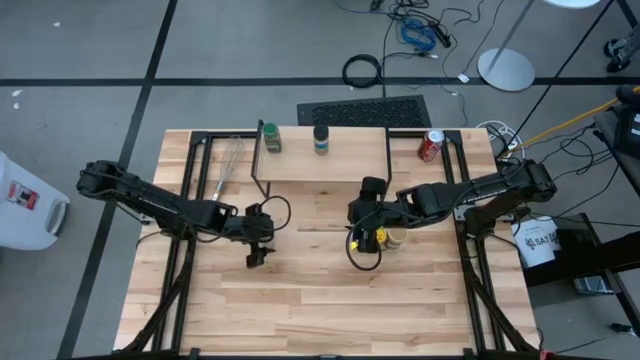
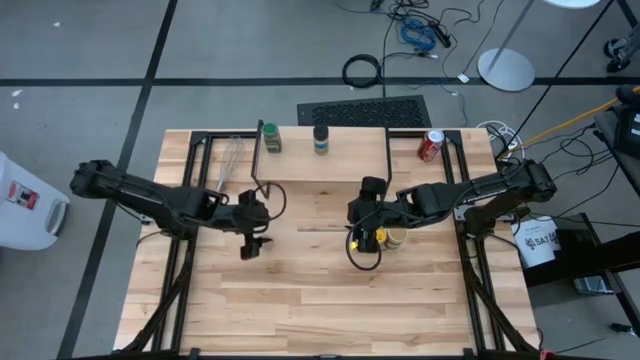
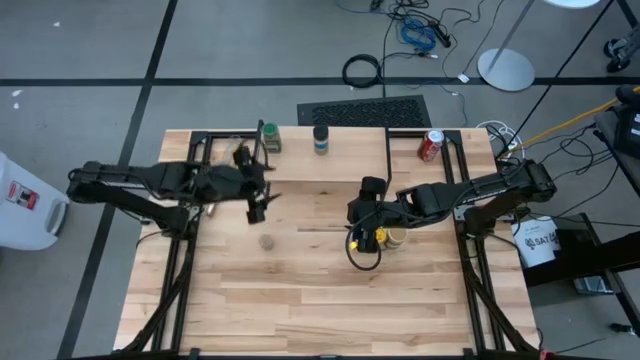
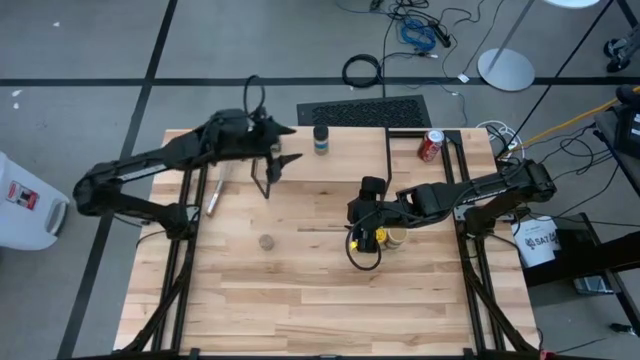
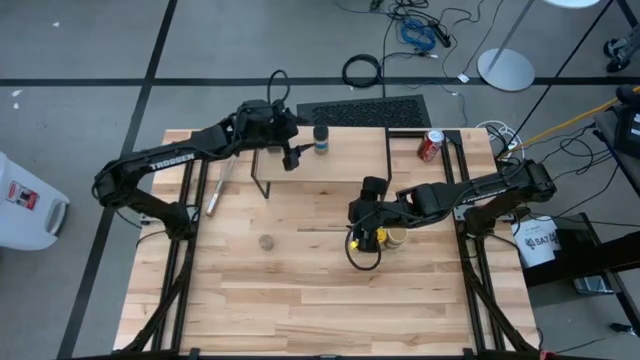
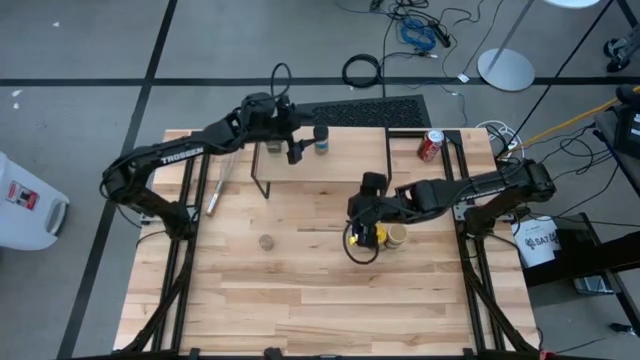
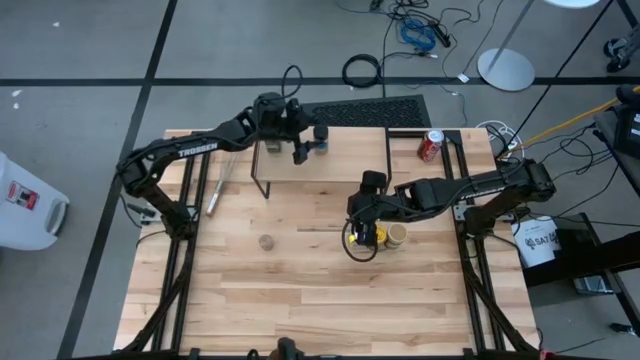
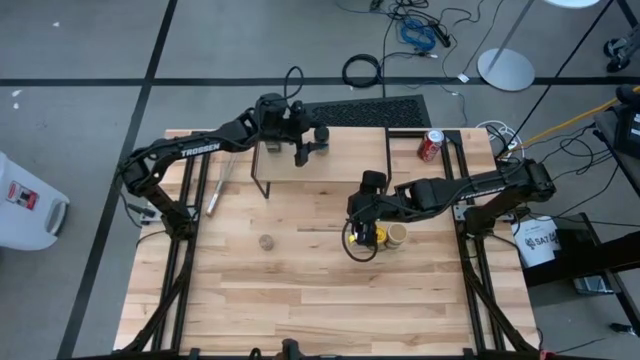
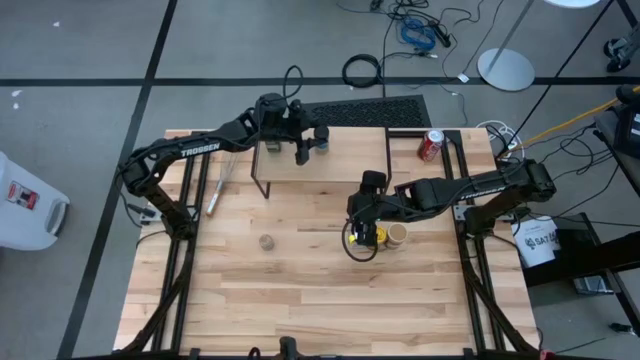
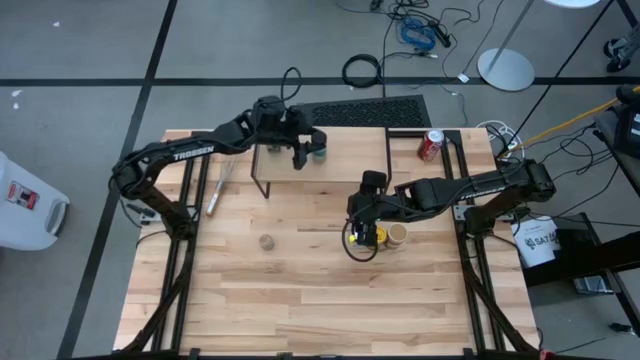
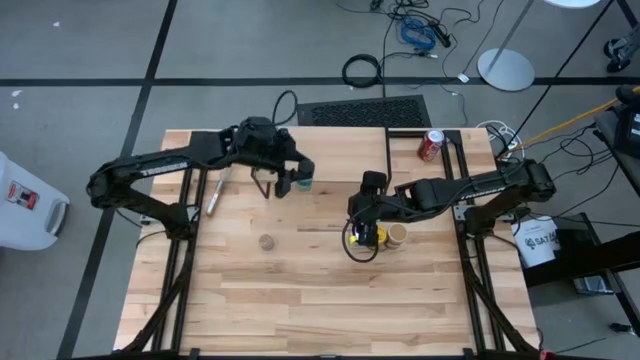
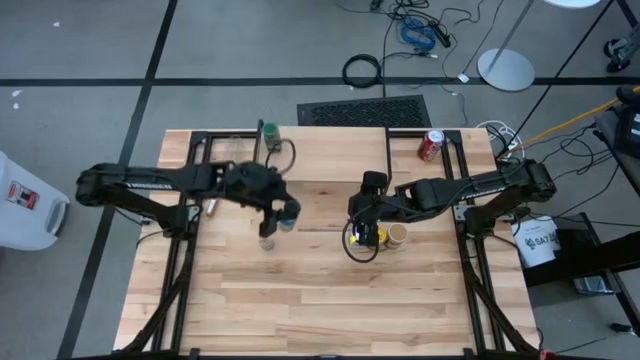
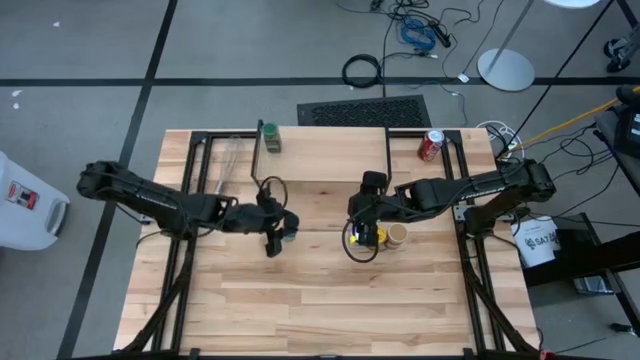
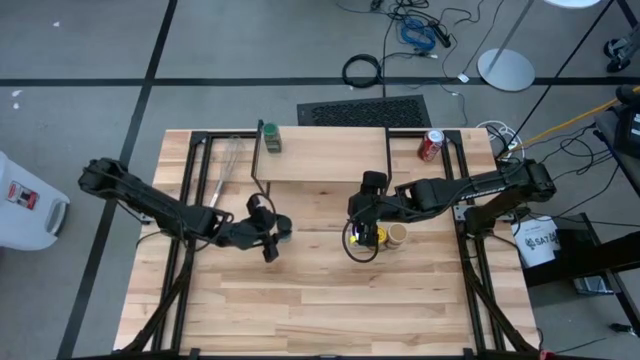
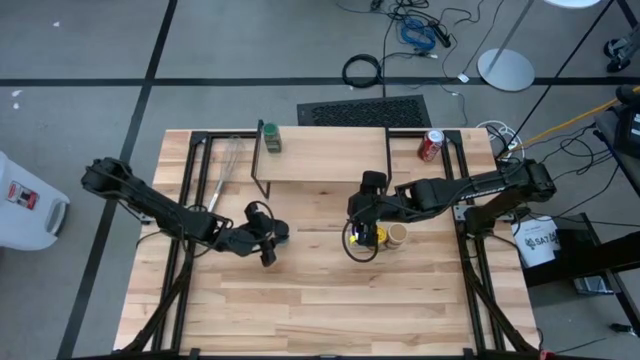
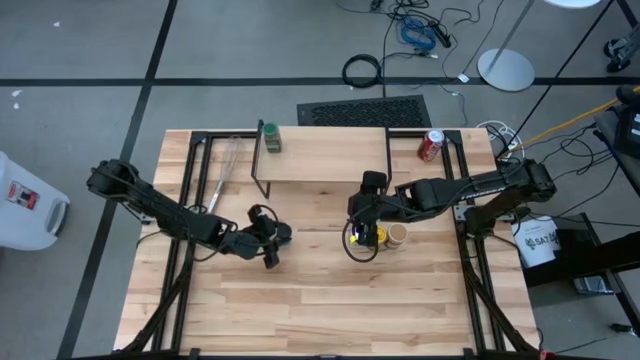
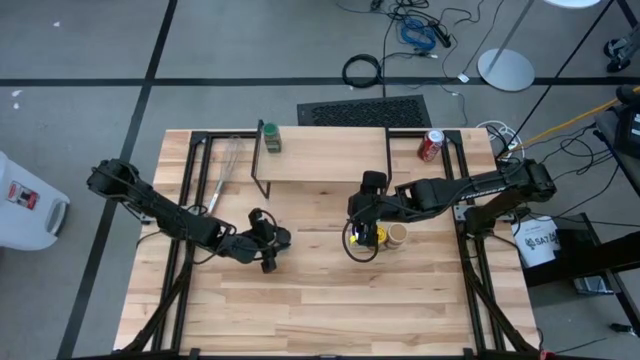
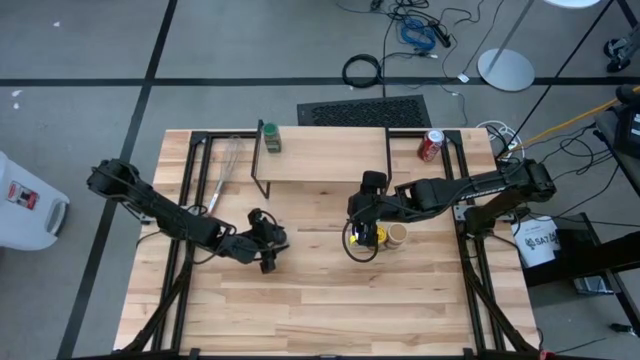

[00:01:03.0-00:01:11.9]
Task: Shelf spices
Remove the black seasoning bottle from the shelf

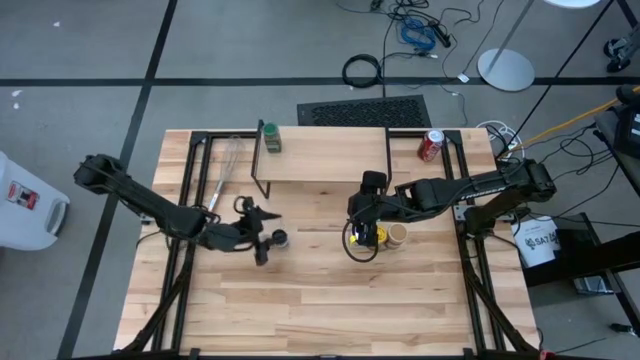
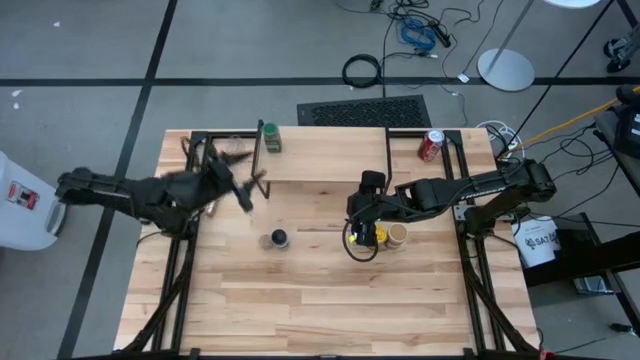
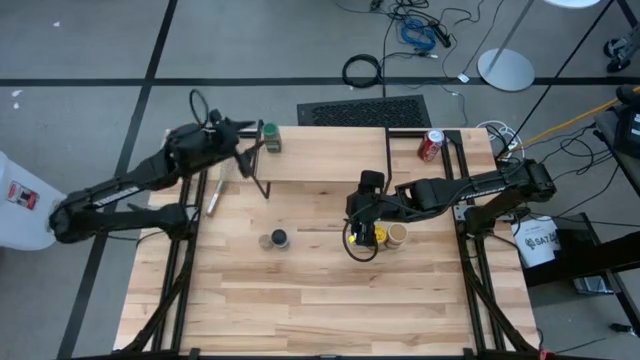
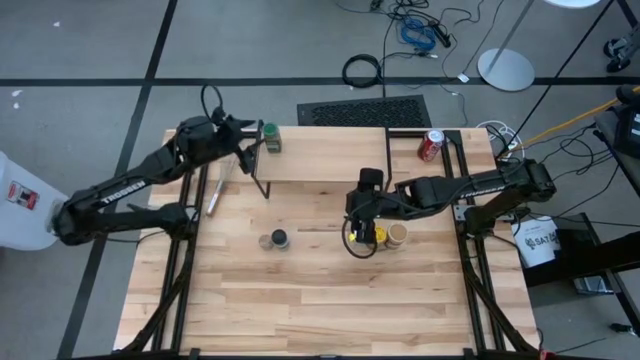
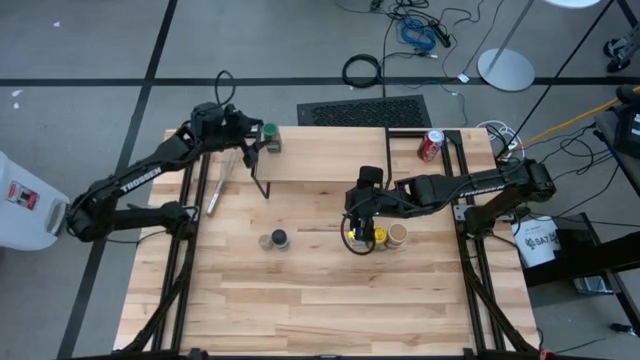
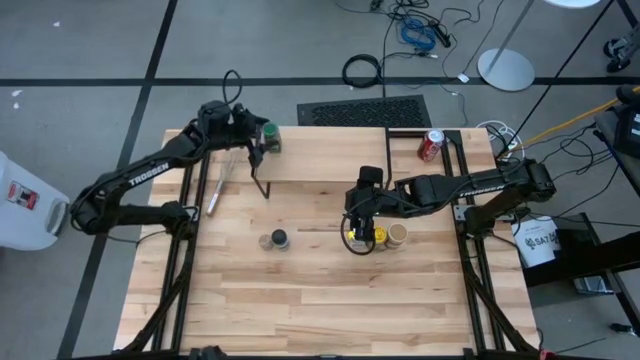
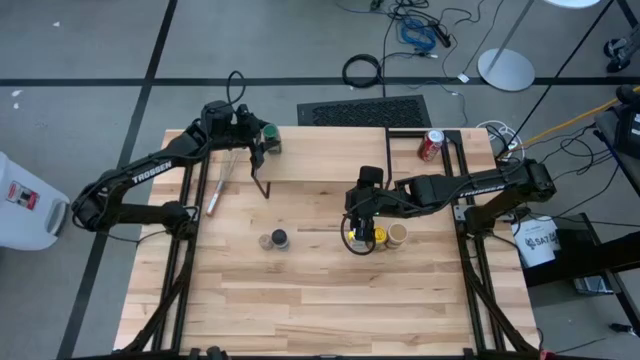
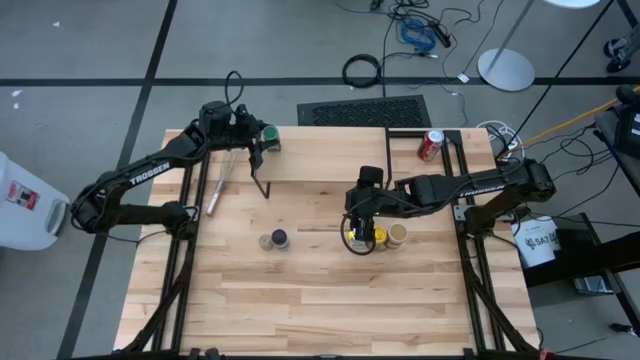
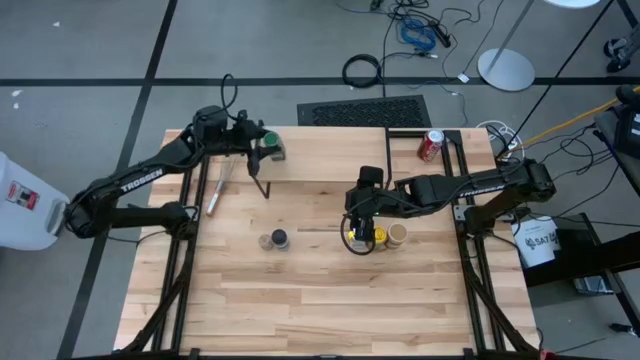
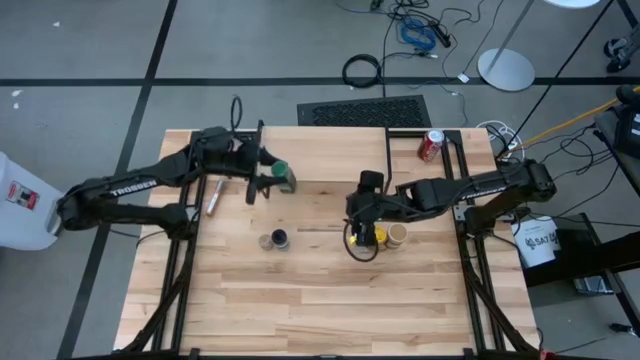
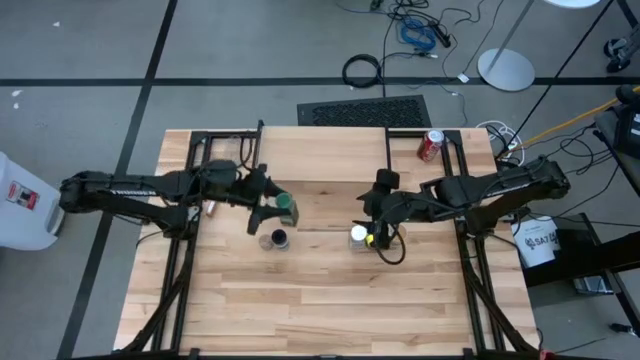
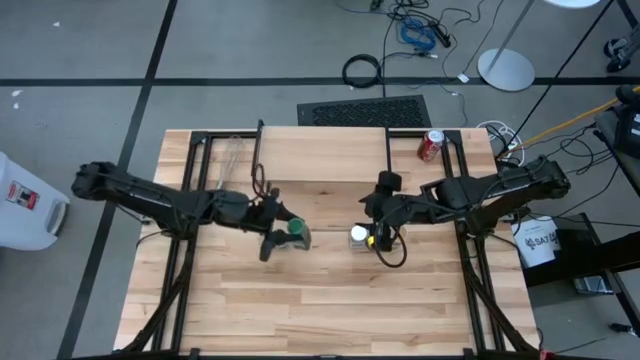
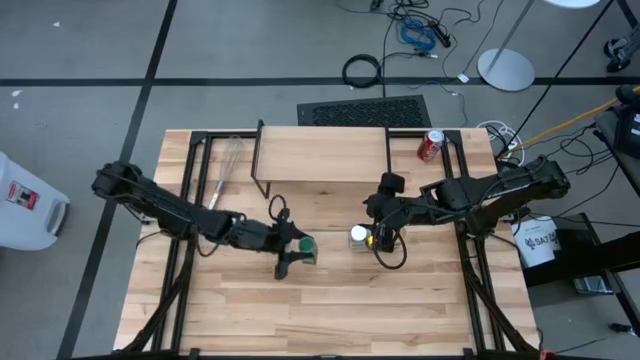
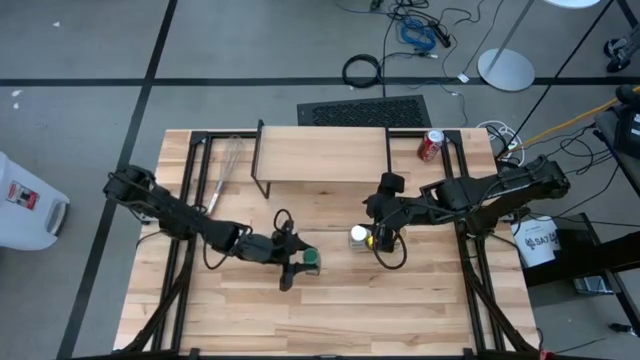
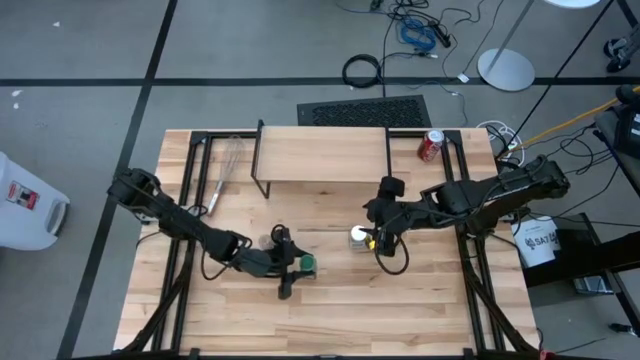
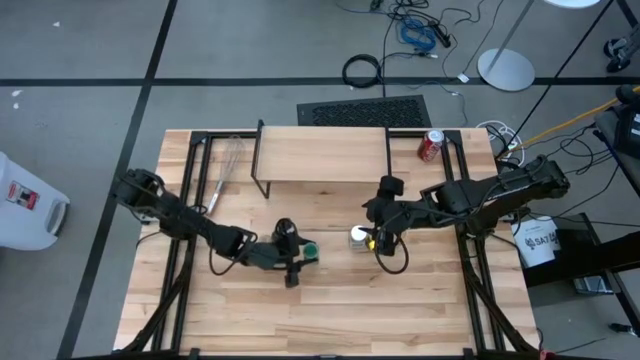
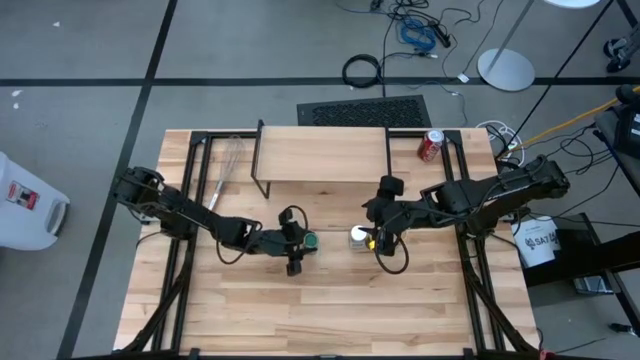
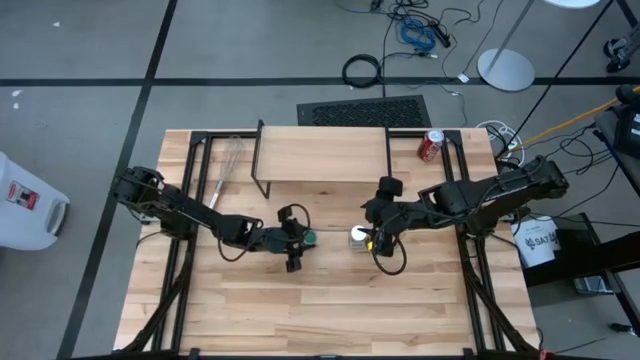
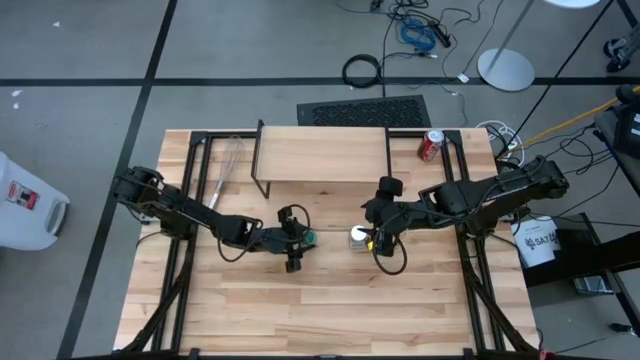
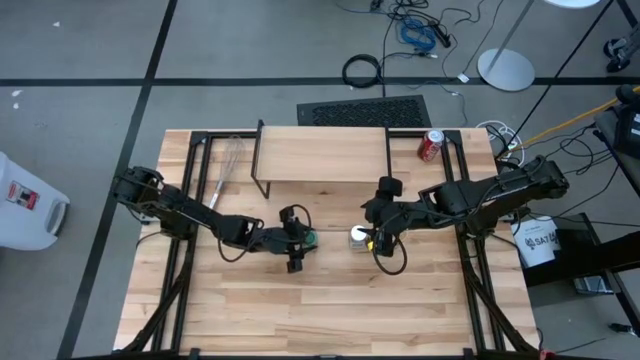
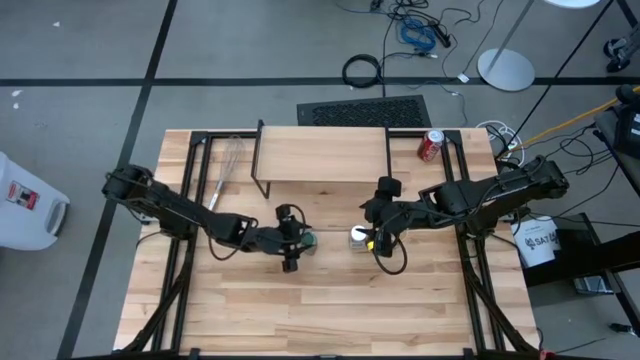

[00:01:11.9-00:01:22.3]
Remove the green seasoning bottle from the shelf

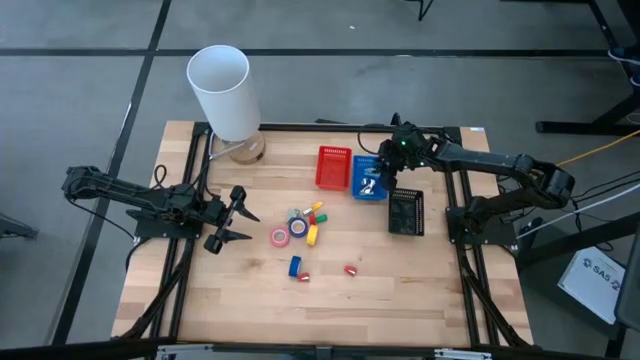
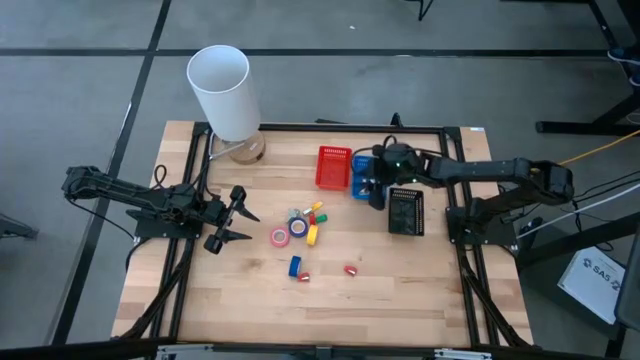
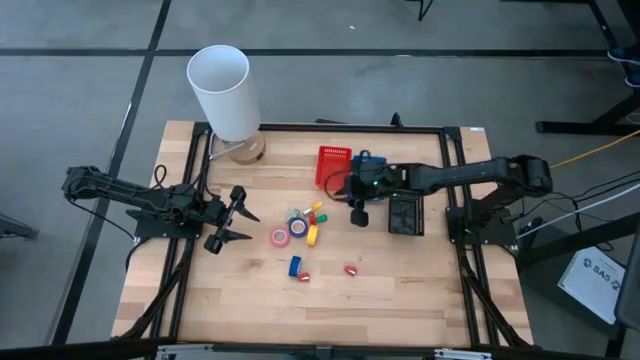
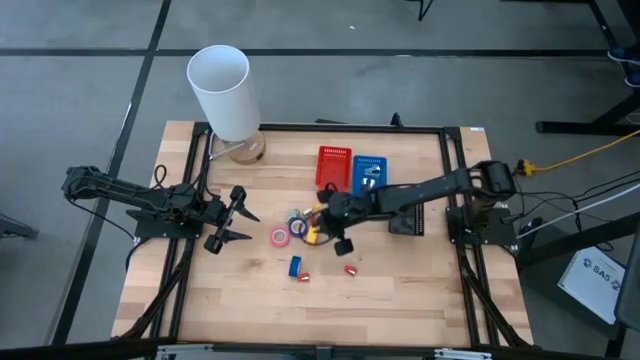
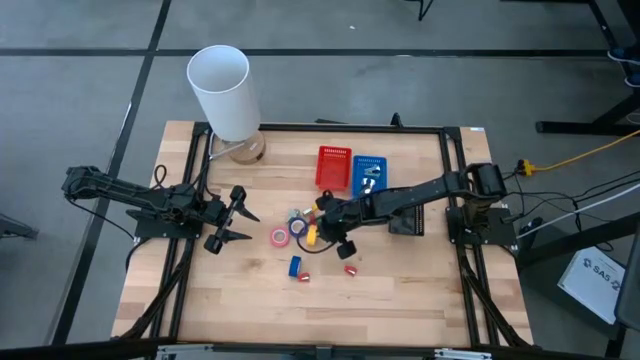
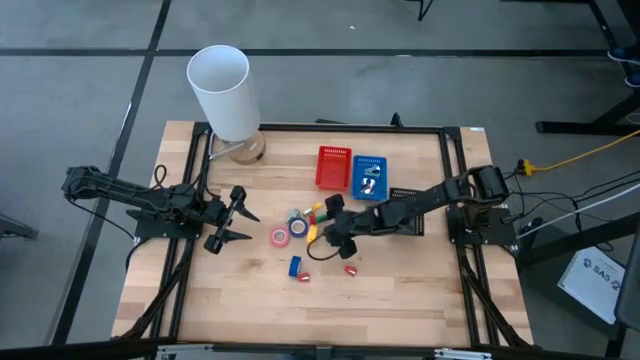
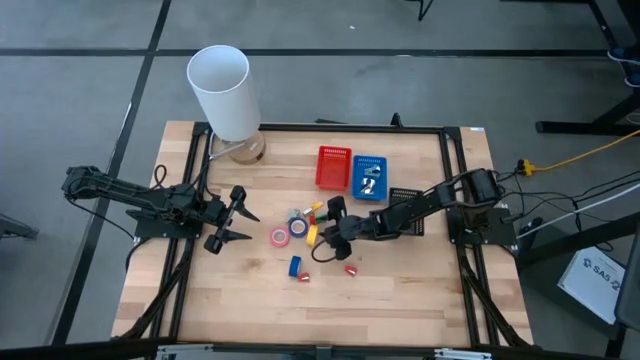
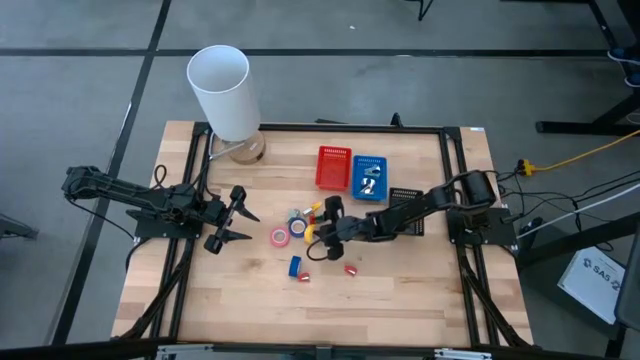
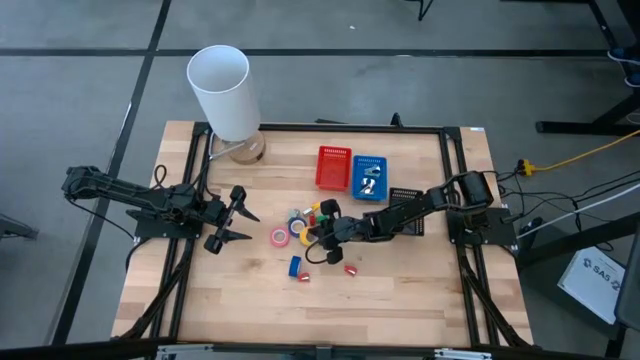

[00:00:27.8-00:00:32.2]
Task: Pick and place Stapler, Stapler remover, tape
Put the yellow tape into the black bin
